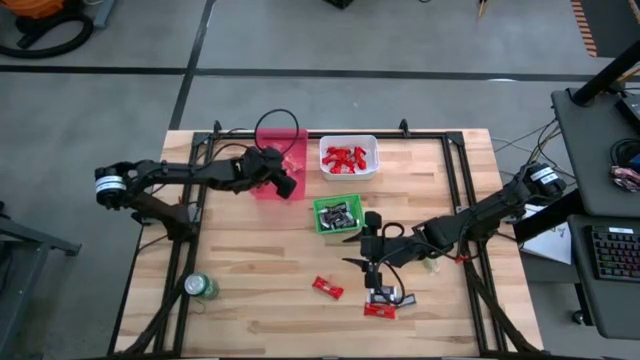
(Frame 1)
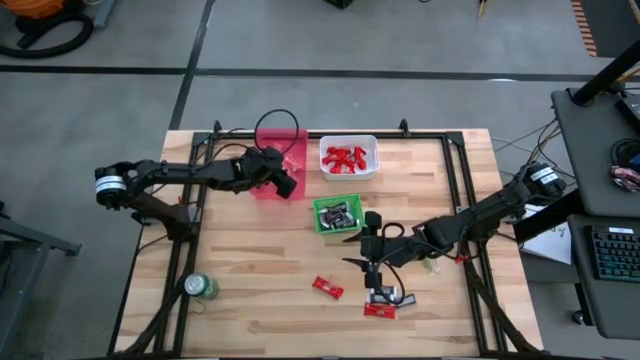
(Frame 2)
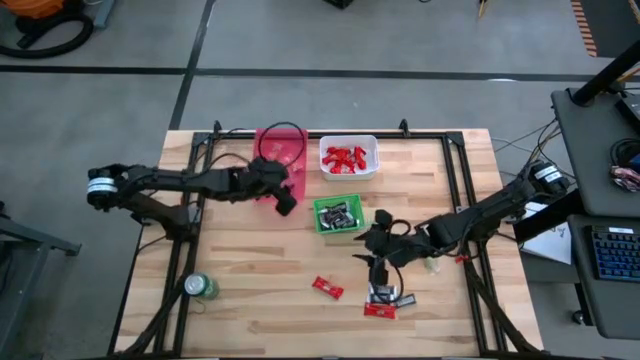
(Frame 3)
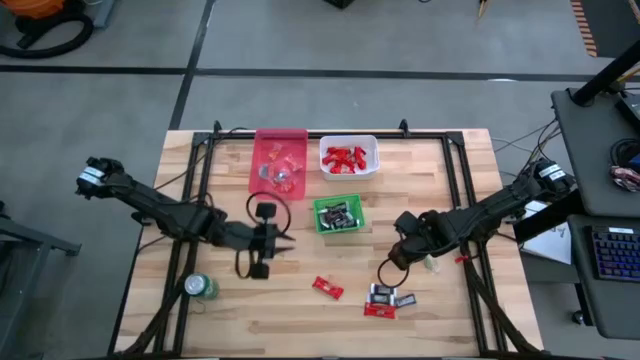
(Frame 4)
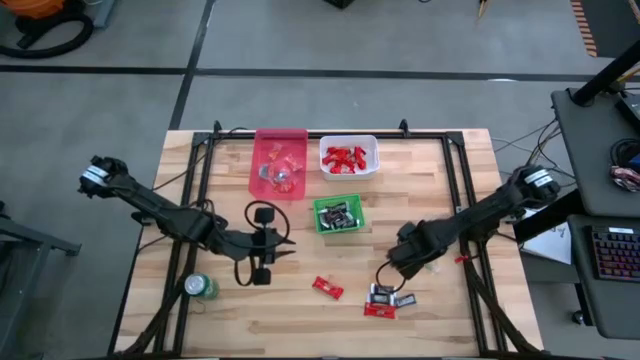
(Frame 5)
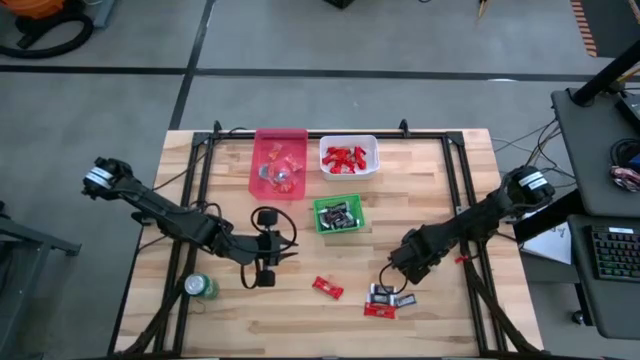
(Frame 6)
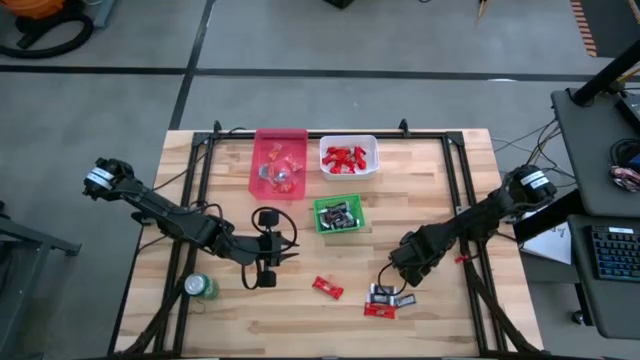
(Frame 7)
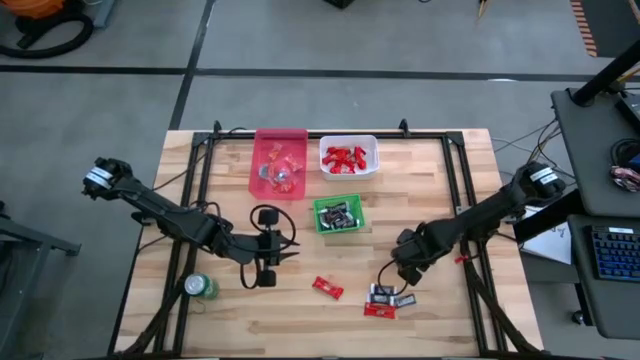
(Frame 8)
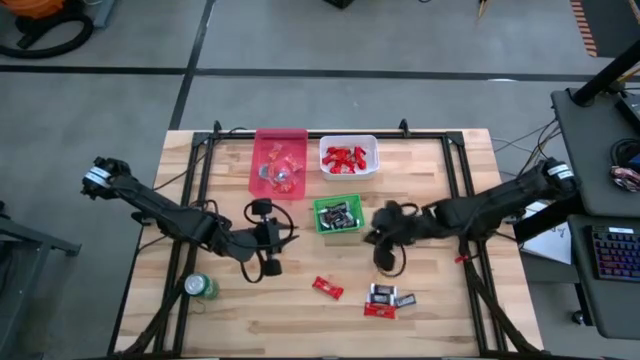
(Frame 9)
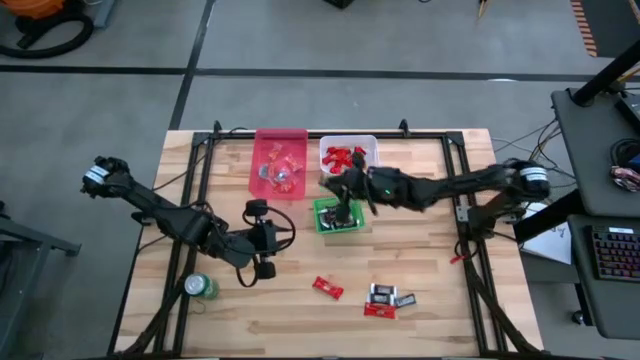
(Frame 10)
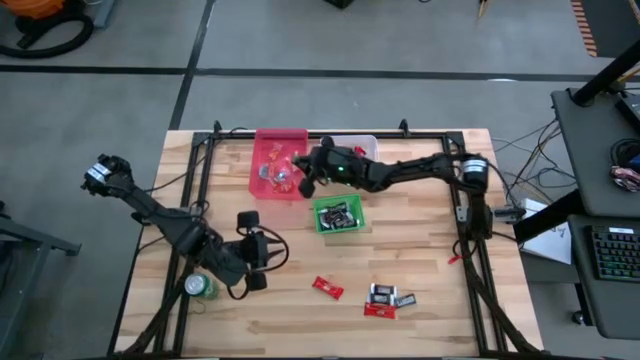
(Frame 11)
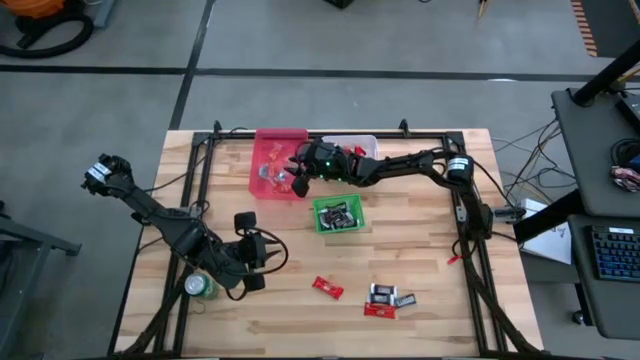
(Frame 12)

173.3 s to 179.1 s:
Task: Sort candy
Put the green candy into the red bin

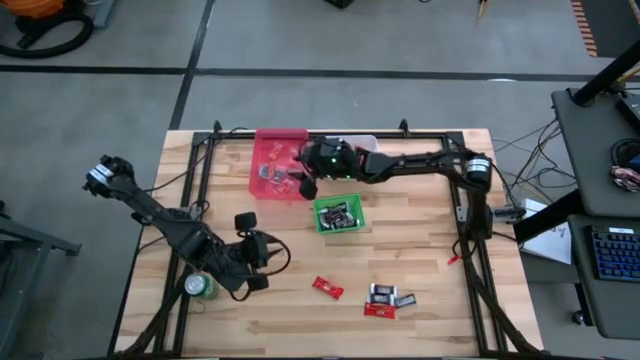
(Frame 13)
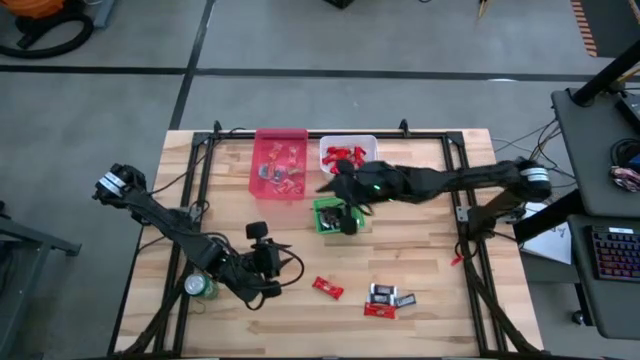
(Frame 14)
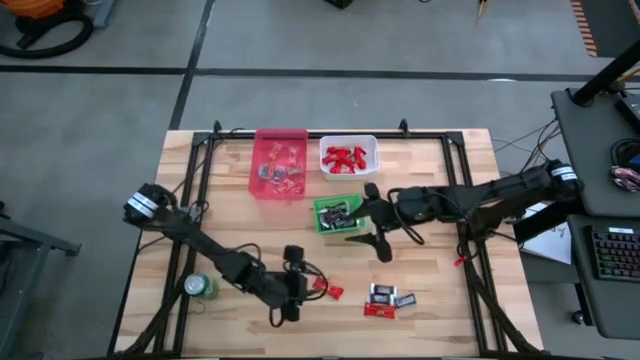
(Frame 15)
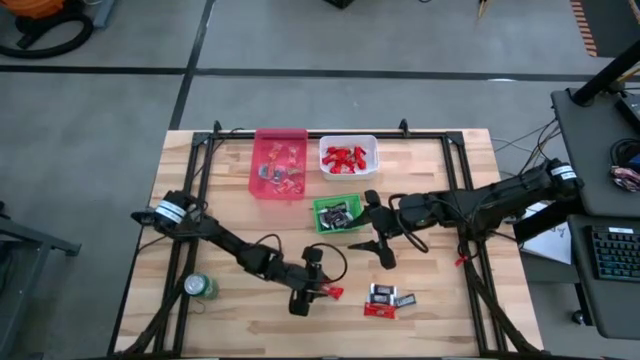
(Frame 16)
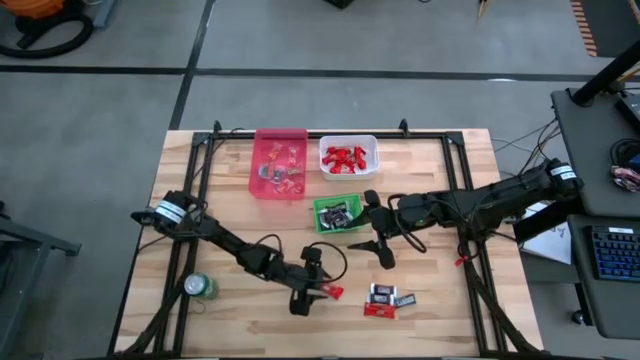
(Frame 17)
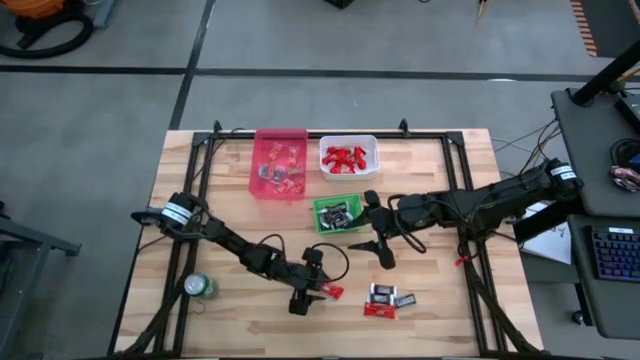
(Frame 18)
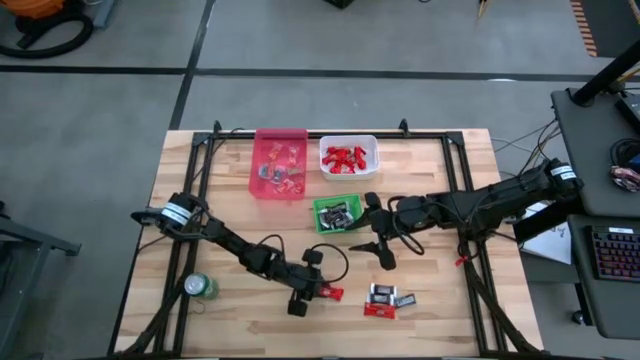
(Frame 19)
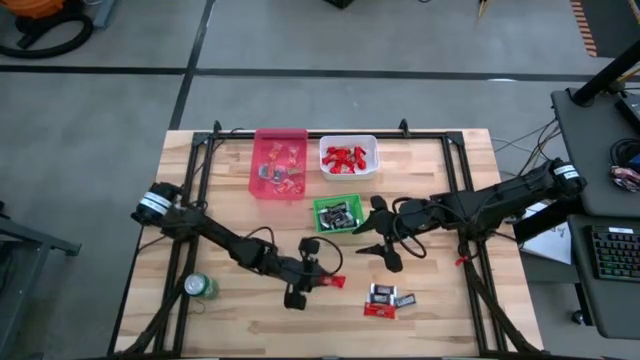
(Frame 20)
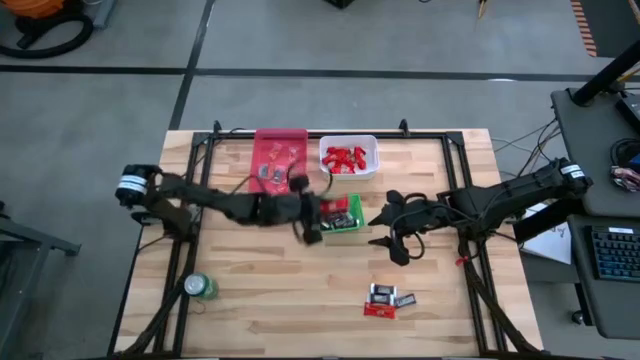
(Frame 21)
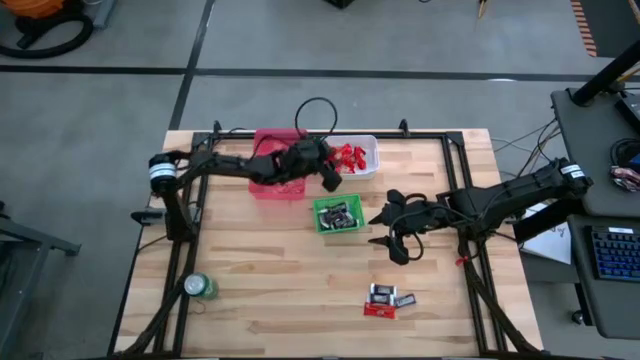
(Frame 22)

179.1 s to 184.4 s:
Put the red chocolate bar into the white bin

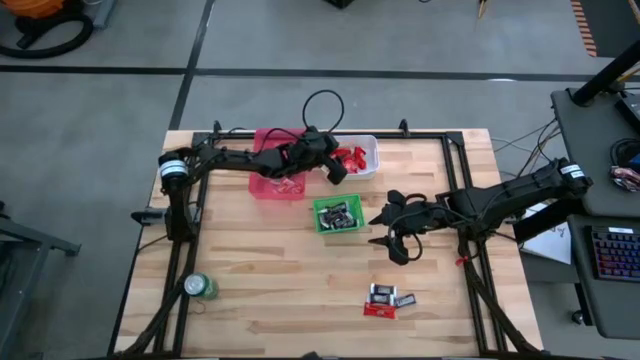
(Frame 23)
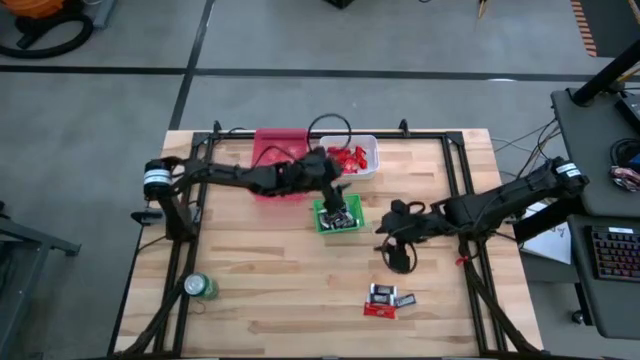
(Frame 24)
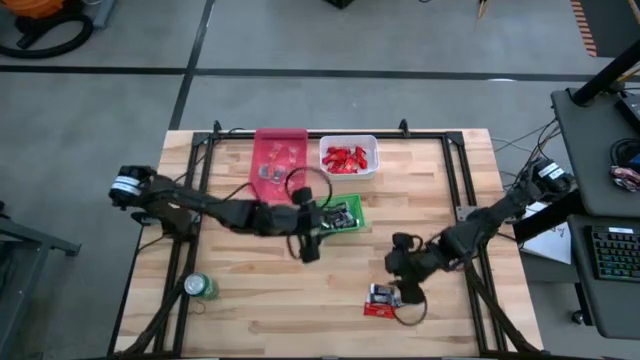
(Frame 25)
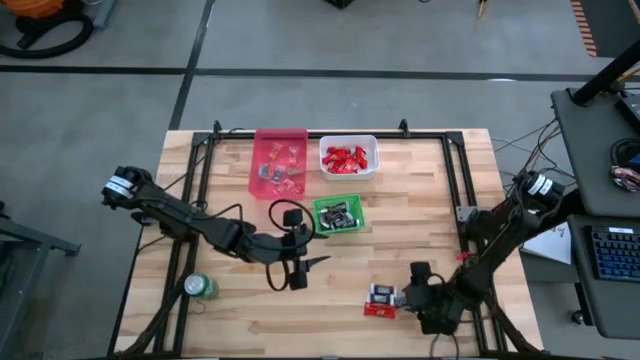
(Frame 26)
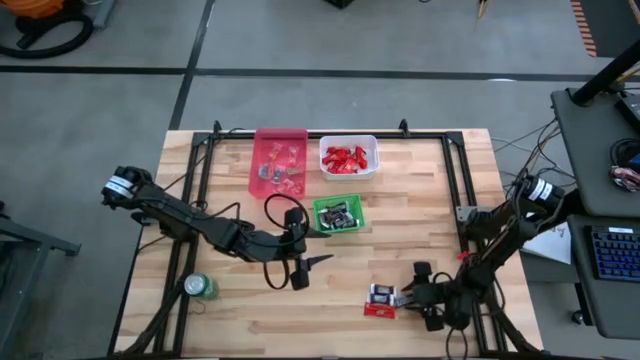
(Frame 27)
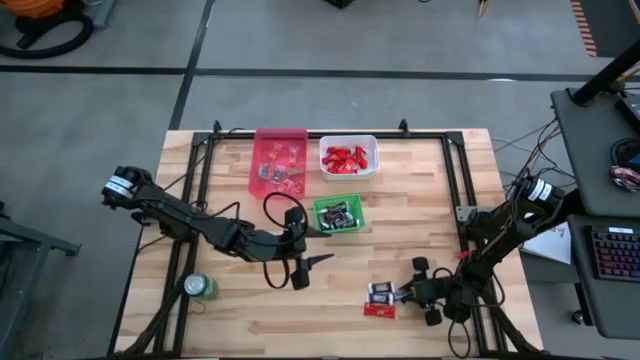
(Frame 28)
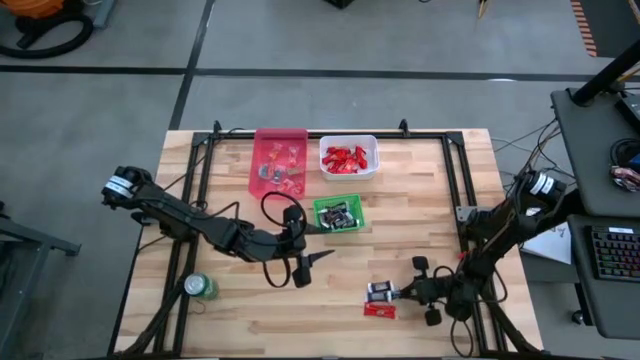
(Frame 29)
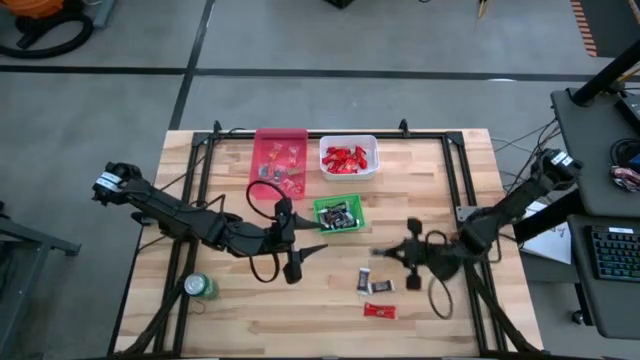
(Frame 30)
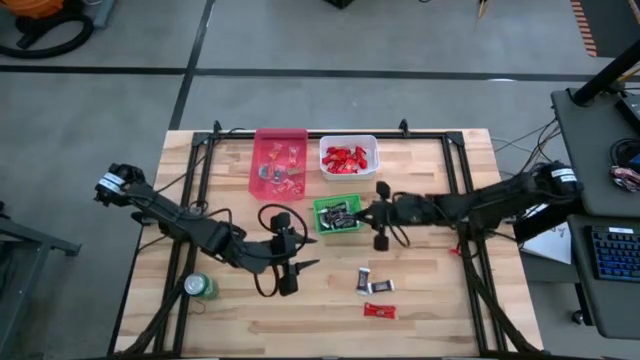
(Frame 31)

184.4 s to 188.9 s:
Put the brown chocolate bar into the green bin

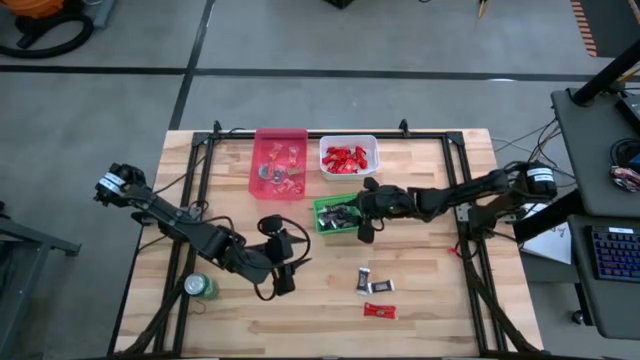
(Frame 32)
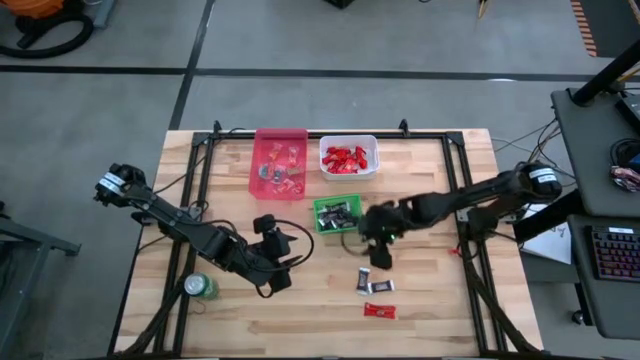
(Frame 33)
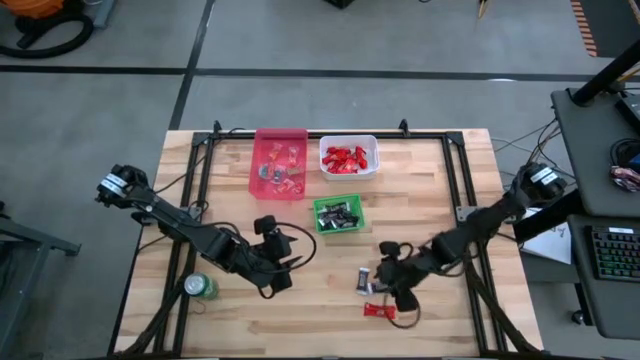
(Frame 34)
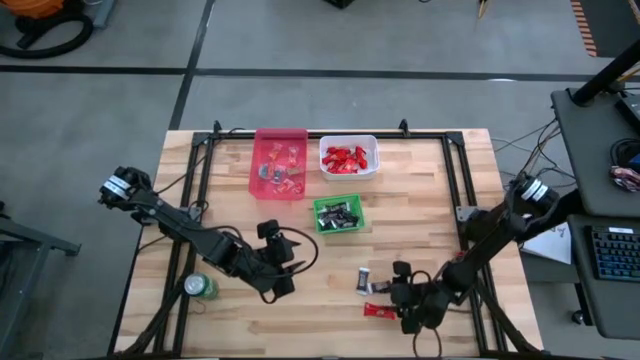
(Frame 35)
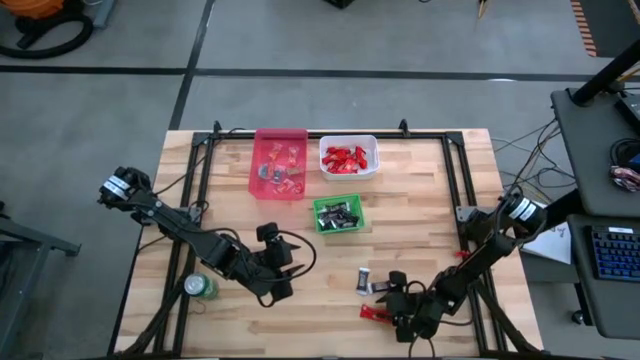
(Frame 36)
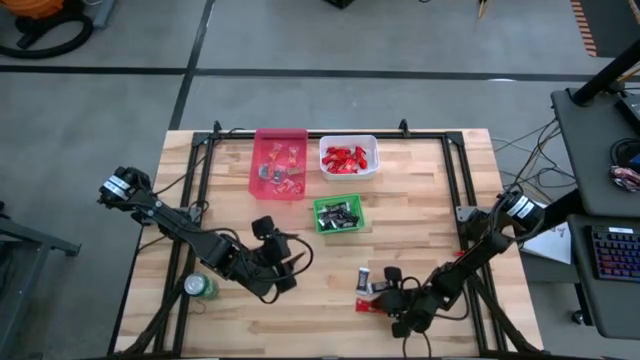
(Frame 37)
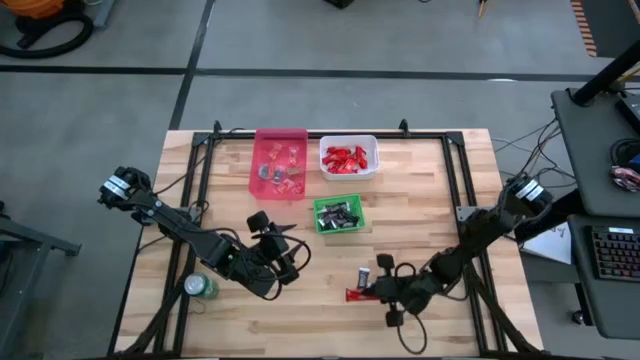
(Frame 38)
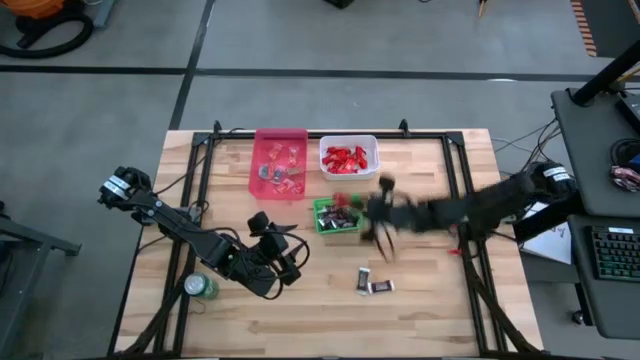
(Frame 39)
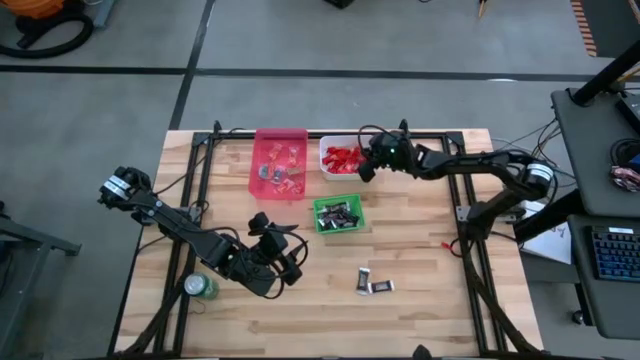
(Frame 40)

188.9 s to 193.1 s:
Put the red chocolate bar into the green bin

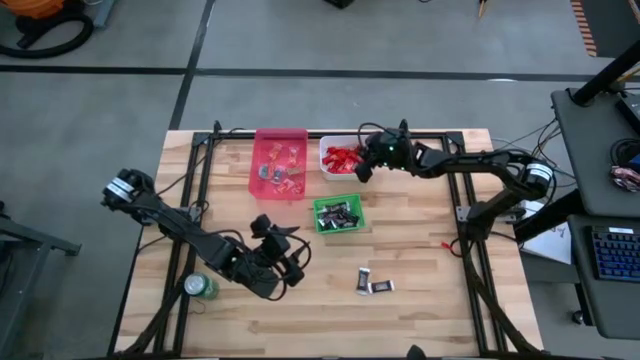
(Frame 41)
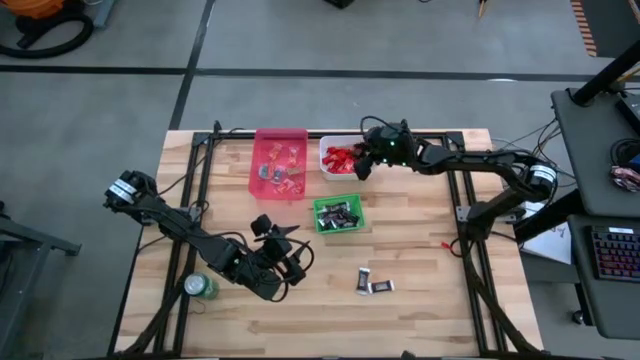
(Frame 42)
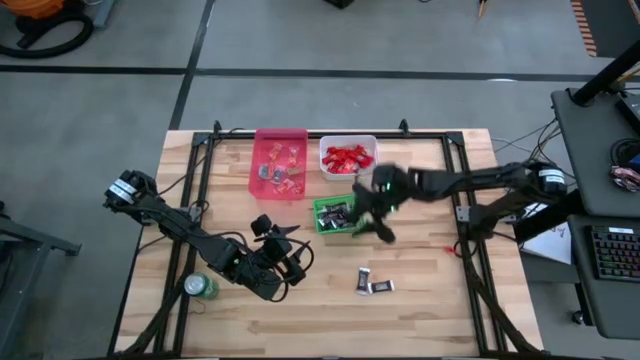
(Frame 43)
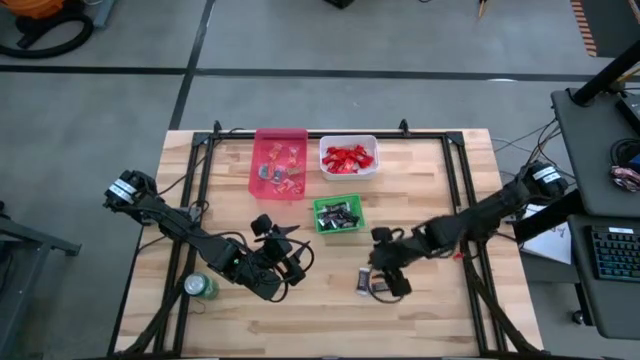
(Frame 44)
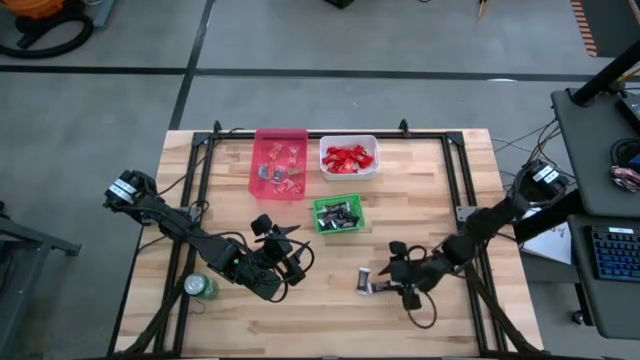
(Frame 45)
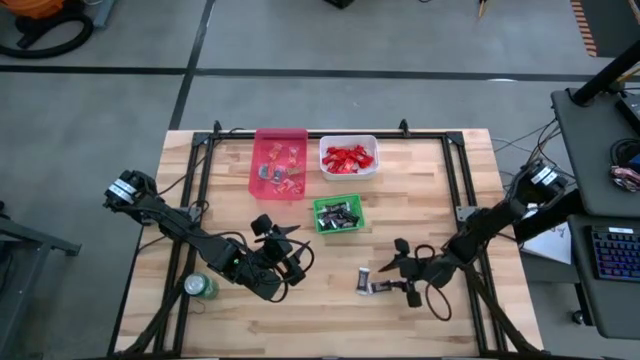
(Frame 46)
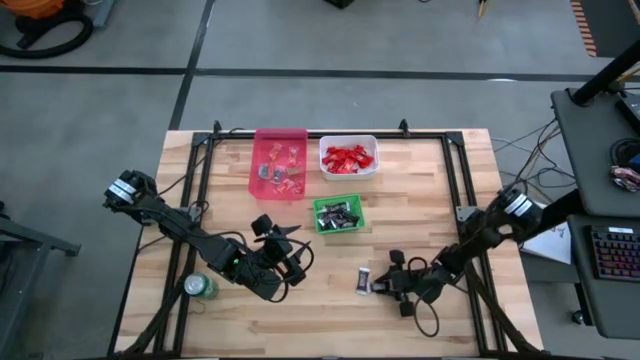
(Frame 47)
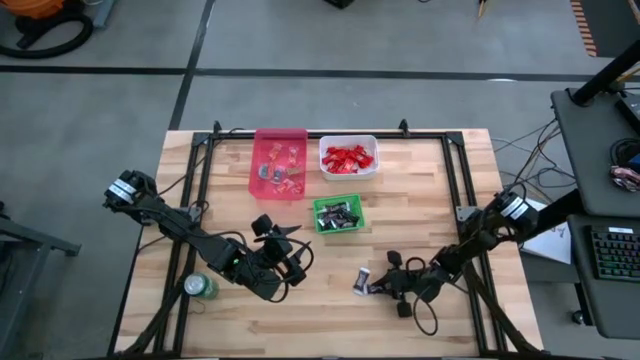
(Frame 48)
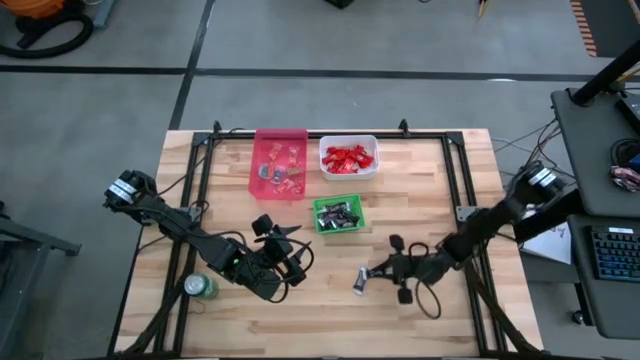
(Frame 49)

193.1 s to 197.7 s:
Put the brown chocolate bar into the green bin
